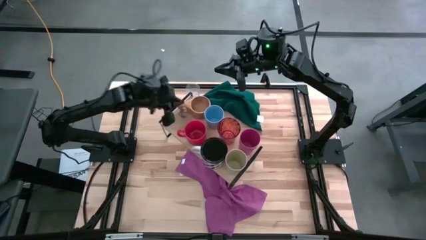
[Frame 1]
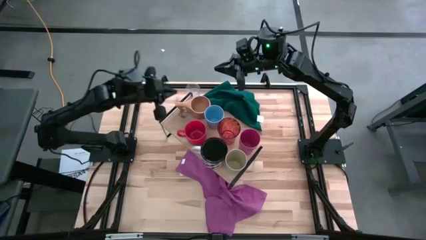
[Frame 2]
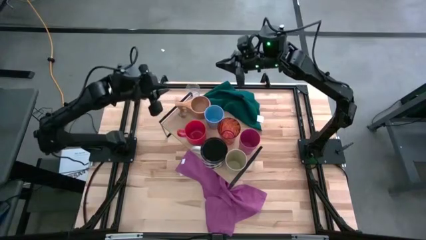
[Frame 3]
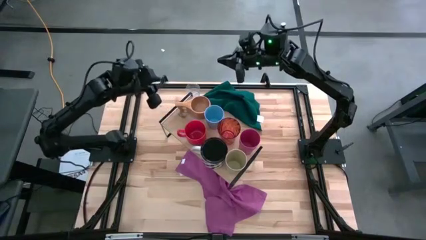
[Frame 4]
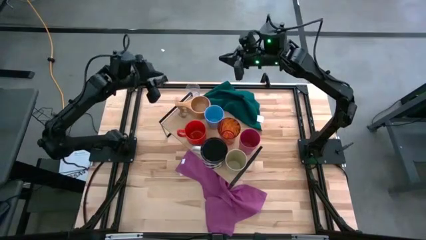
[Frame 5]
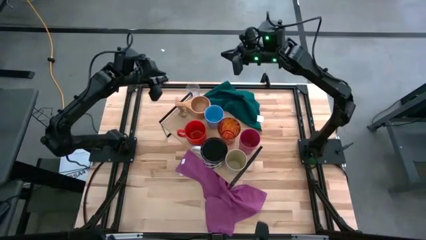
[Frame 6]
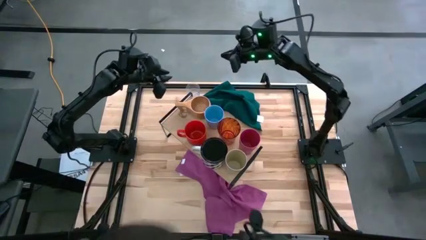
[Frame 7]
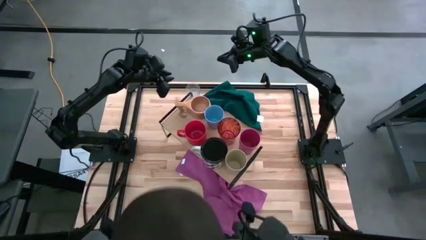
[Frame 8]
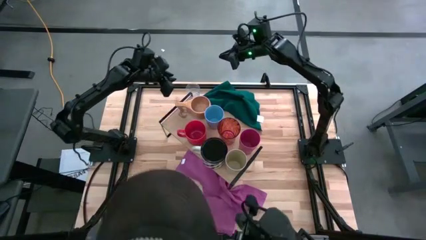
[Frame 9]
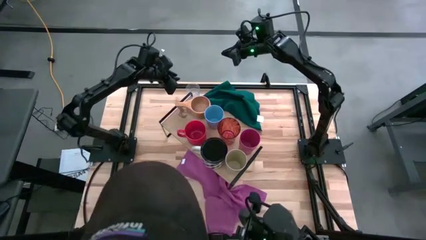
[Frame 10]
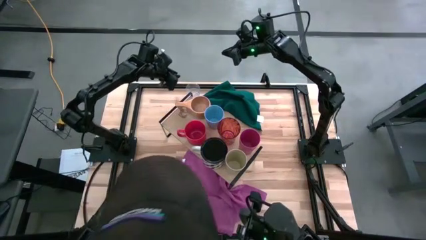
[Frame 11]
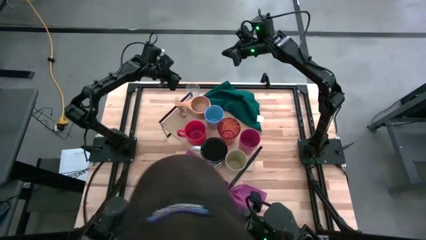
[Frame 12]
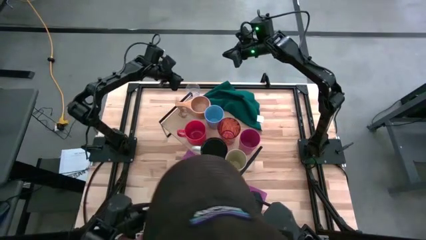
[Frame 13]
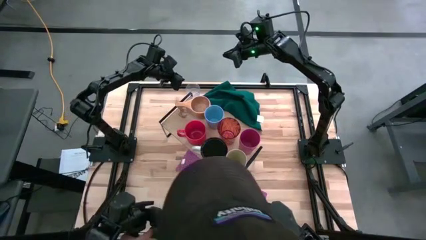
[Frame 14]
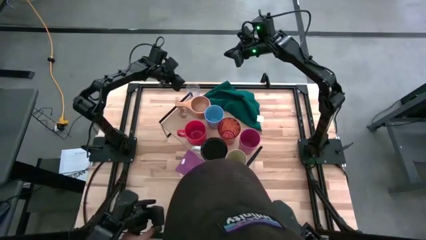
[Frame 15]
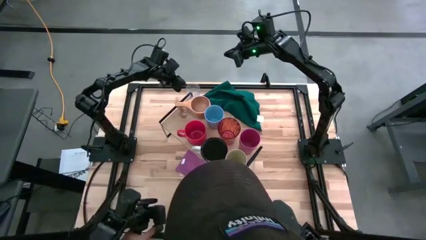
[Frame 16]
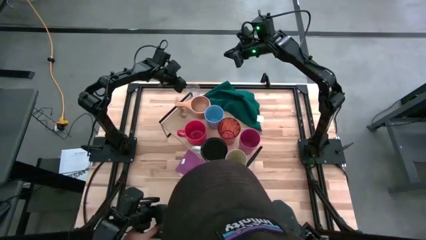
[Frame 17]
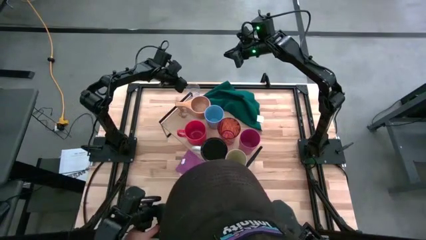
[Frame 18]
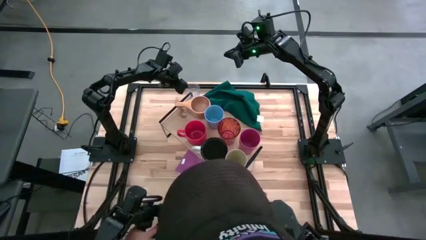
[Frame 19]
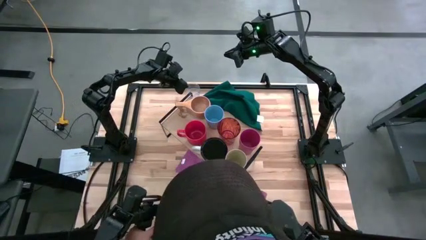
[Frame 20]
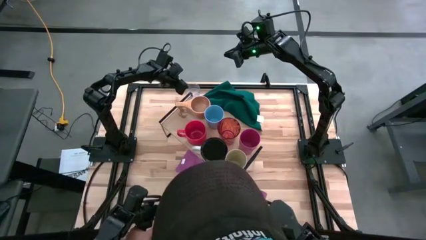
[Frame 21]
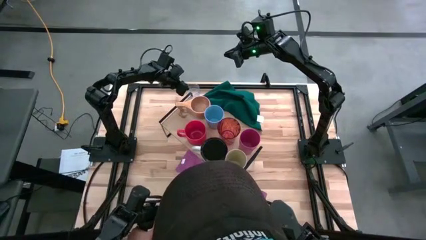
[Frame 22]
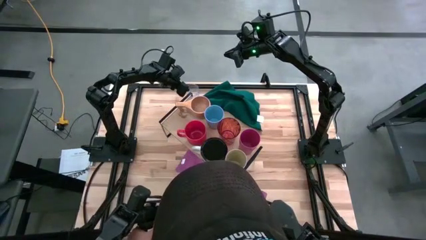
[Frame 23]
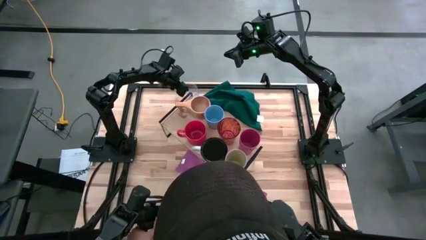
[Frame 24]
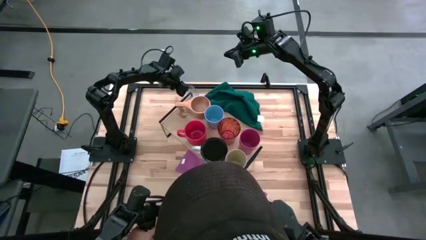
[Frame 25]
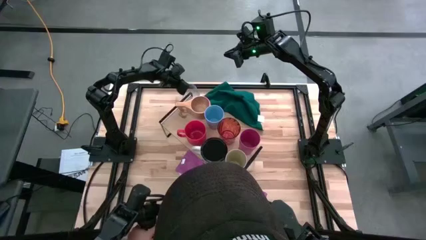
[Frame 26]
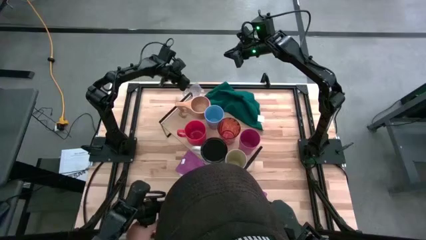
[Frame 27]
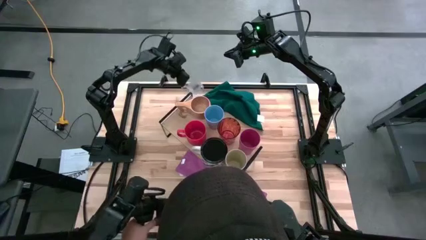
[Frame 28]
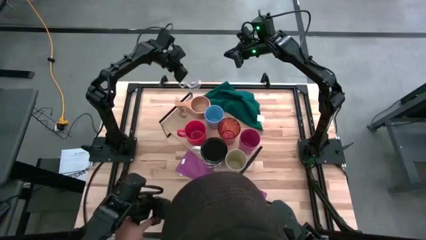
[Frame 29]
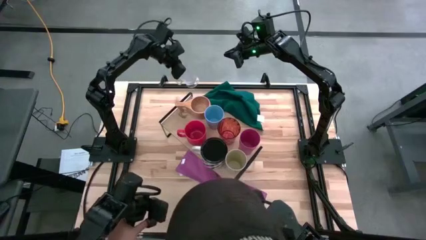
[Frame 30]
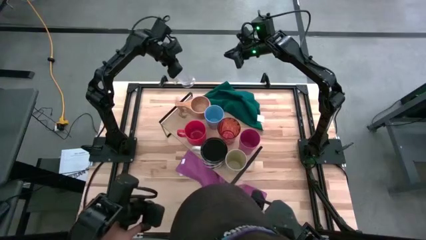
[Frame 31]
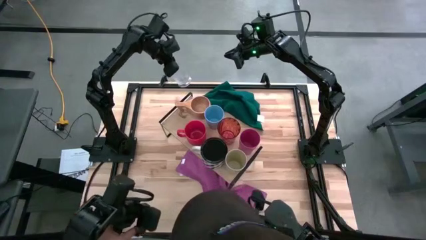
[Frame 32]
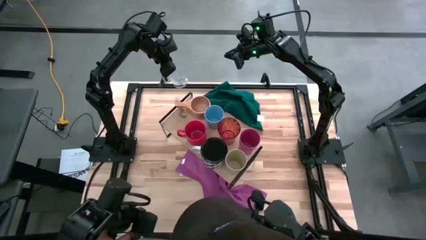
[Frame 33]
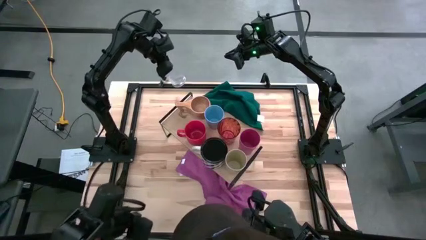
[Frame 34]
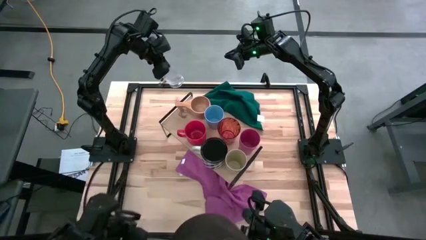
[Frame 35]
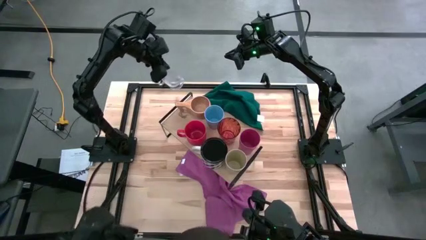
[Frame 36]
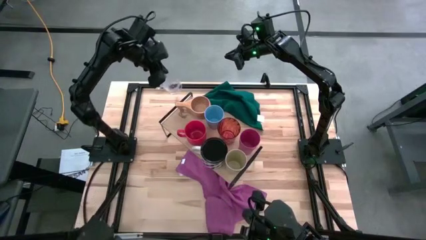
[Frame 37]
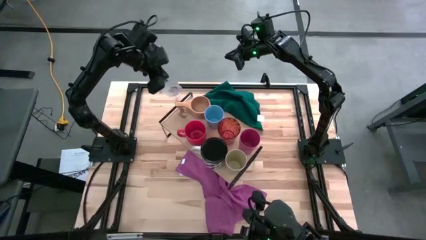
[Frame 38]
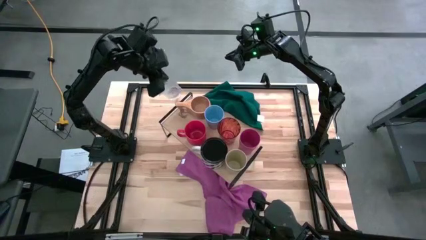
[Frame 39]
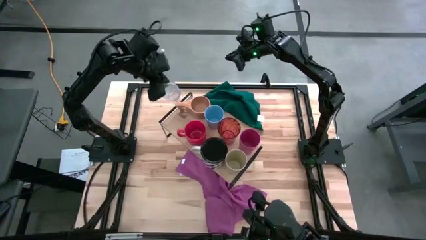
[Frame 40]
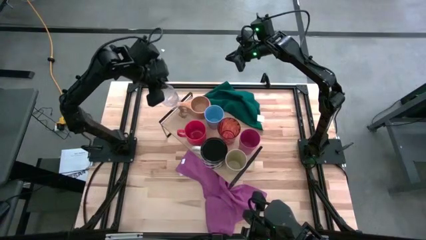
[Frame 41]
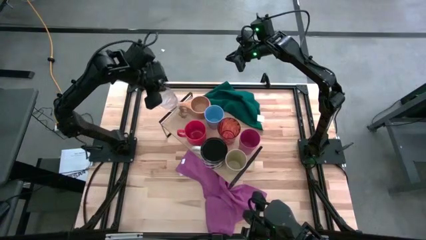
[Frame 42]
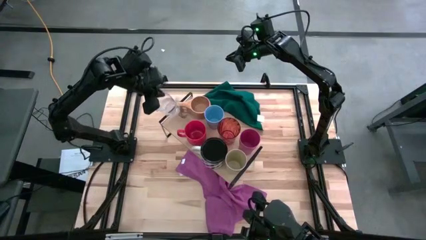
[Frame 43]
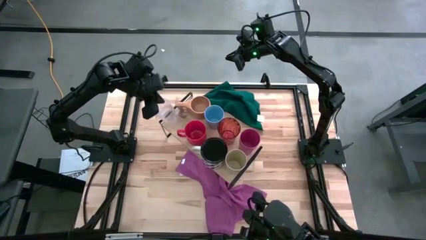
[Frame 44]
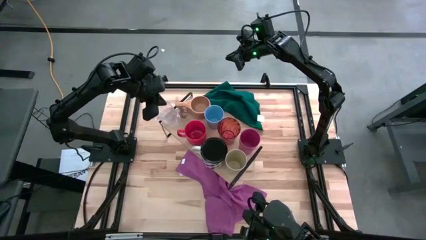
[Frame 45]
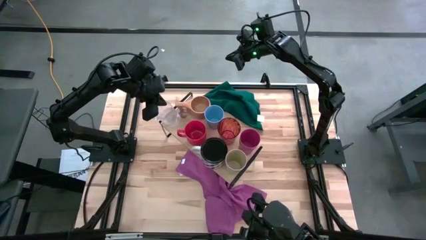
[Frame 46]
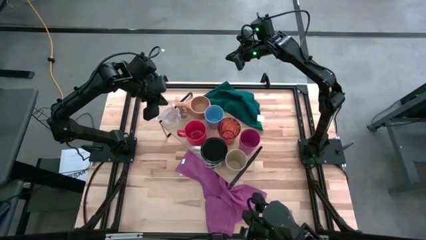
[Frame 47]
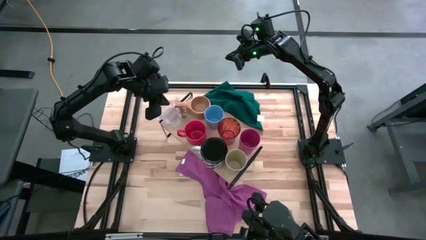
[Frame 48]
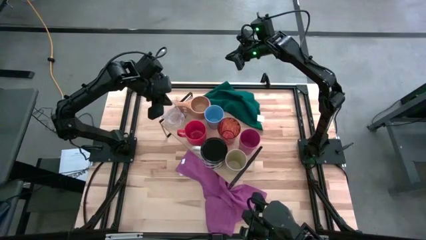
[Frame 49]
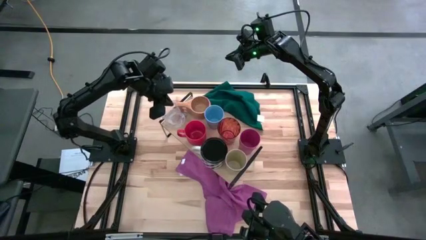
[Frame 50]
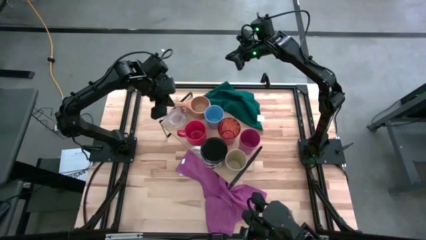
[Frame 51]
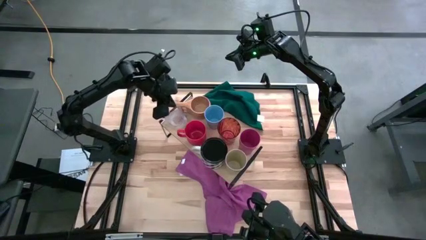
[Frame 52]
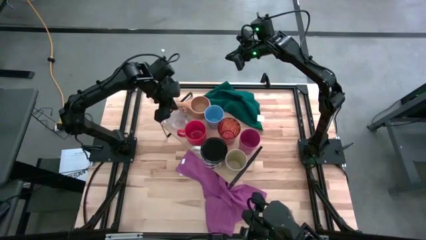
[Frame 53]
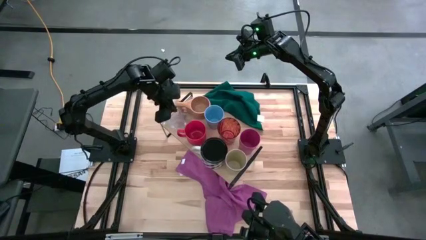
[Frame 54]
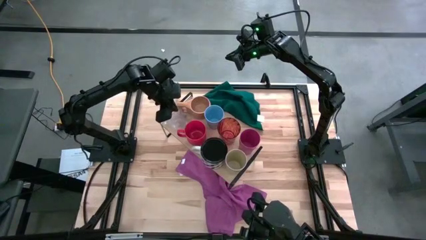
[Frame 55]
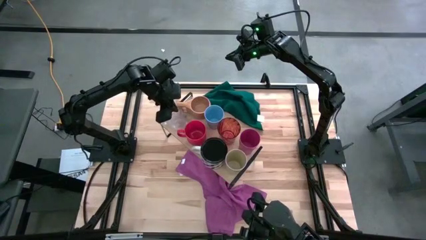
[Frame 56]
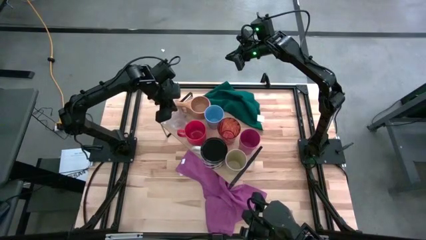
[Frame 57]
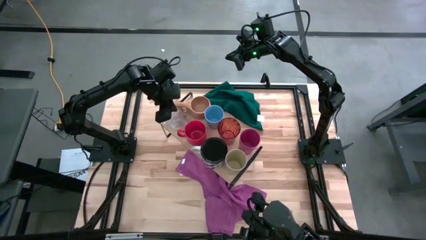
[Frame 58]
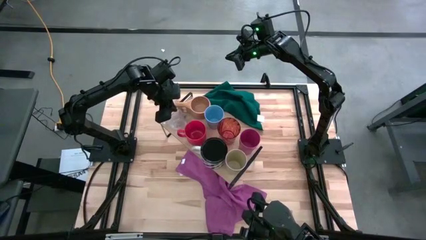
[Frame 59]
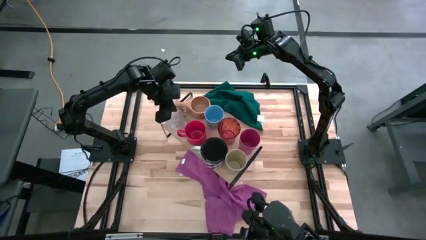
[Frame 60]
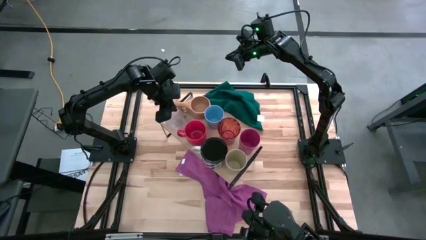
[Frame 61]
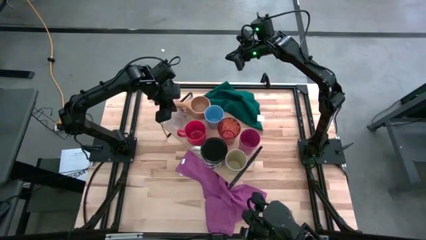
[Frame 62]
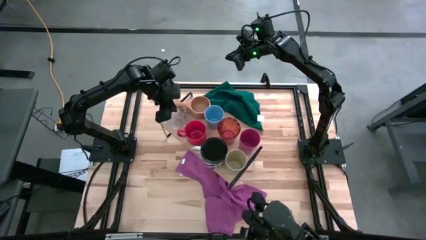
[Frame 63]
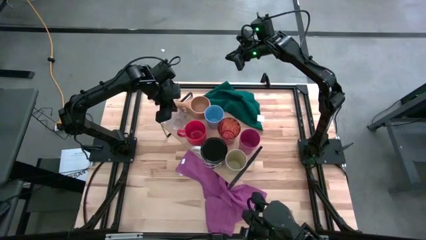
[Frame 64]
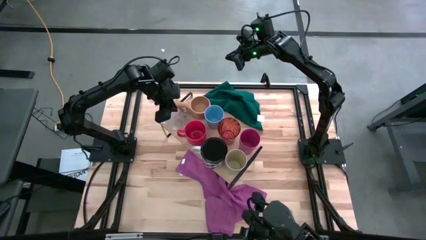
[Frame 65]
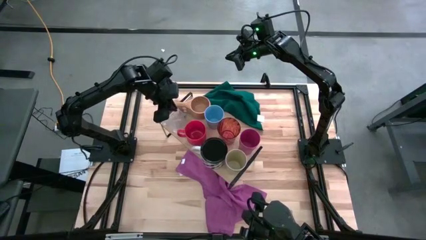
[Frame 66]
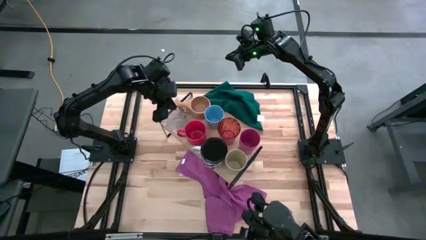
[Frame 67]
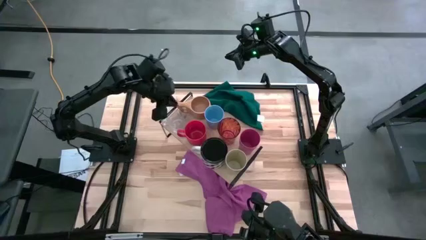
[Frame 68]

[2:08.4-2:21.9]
Task: Stack small to large cups/mugs on shelf
Put the transparent mug on the shelf

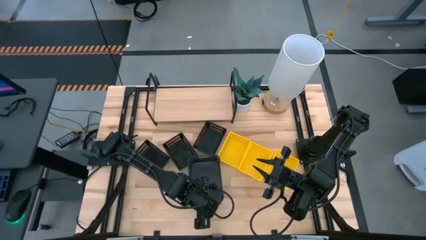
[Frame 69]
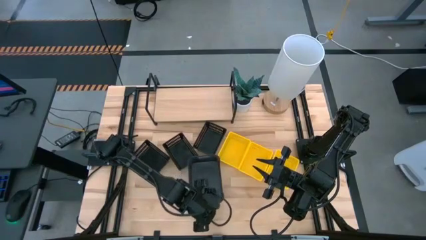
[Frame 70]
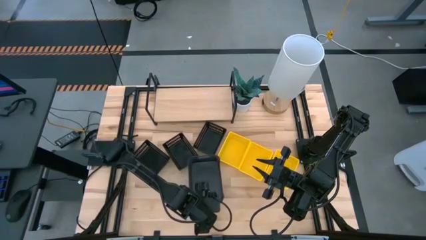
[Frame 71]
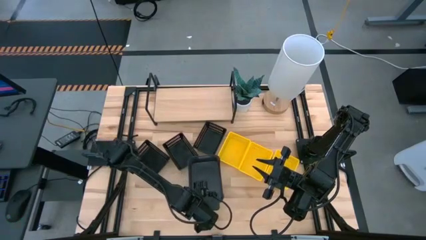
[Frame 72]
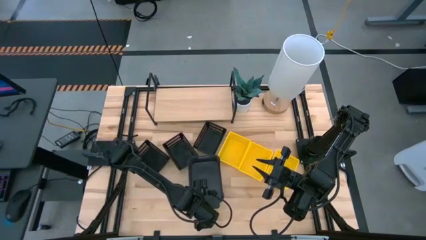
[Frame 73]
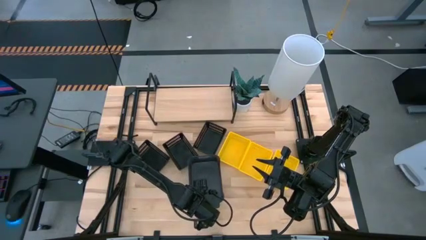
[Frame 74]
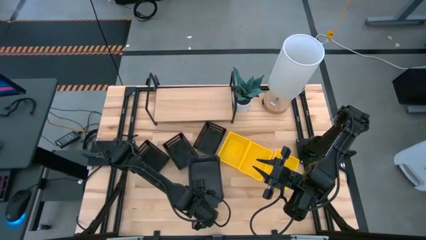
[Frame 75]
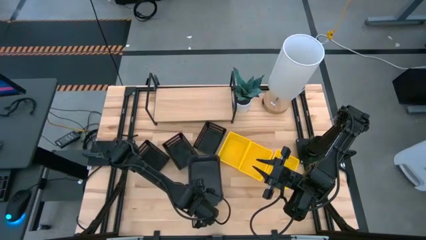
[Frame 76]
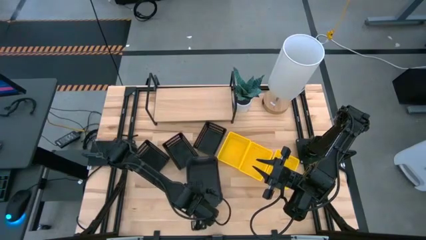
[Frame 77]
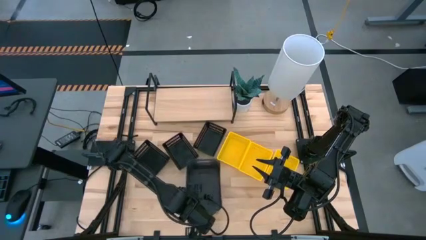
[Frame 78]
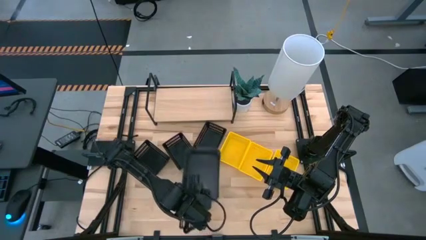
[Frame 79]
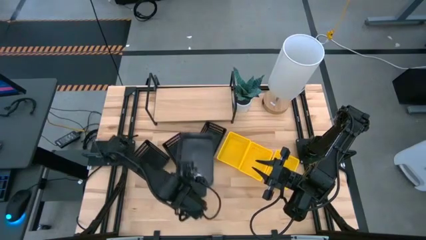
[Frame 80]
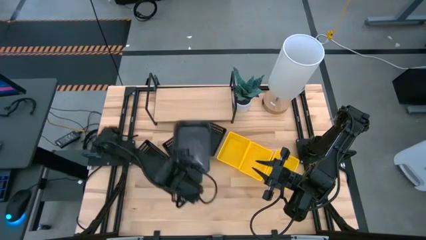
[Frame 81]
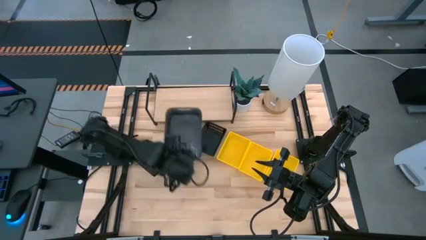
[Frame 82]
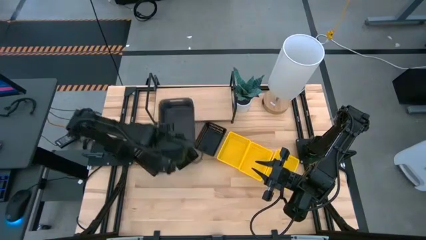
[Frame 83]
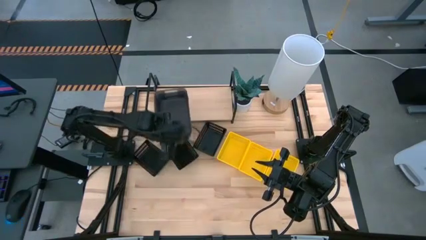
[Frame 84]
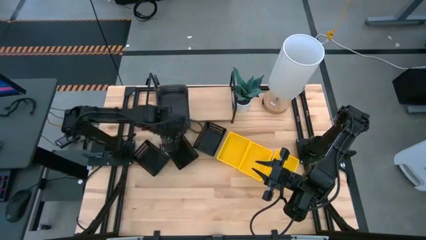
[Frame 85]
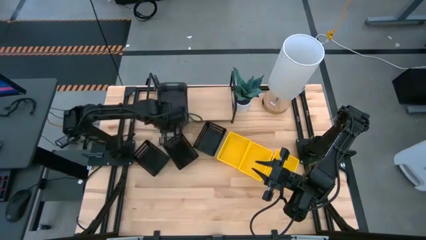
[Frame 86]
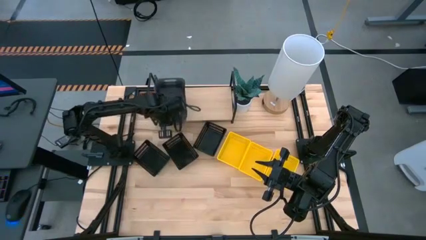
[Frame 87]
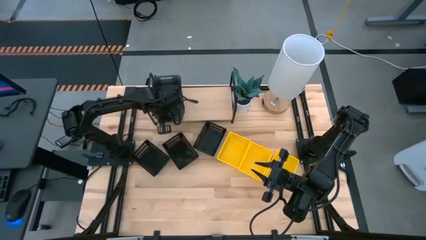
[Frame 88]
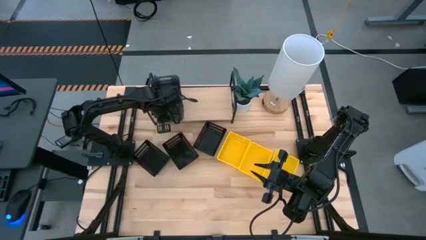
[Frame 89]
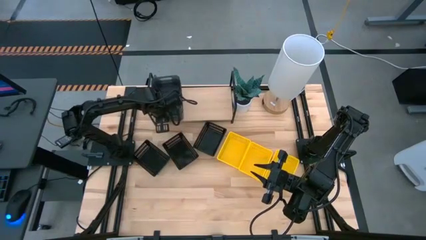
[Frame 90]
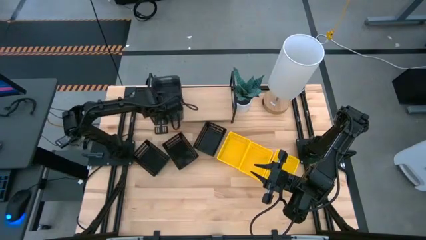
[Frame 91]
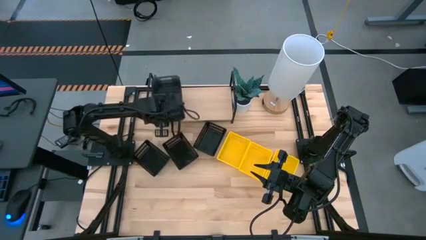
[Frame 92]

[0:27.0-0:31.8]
Task: Stack baskets on shelf by color
Put the stacked gray bins on the shelf
